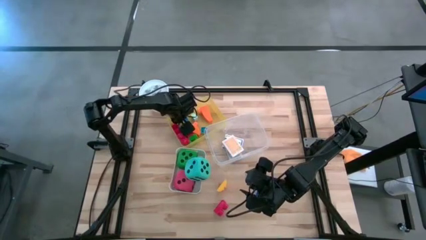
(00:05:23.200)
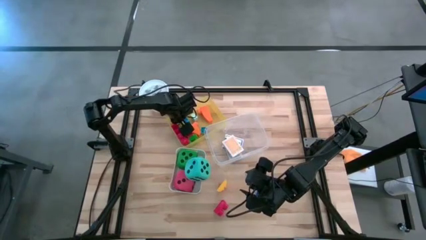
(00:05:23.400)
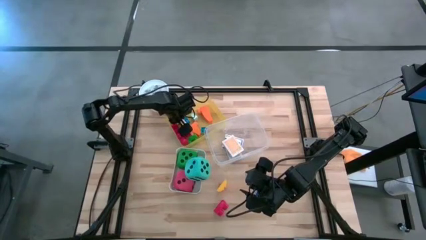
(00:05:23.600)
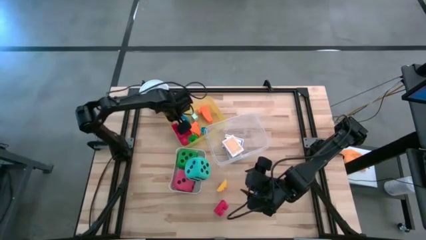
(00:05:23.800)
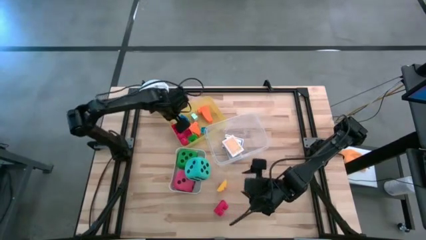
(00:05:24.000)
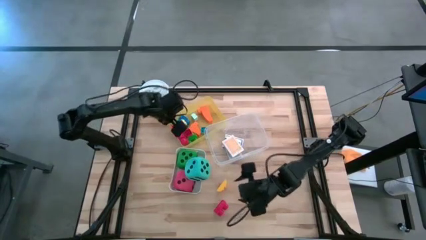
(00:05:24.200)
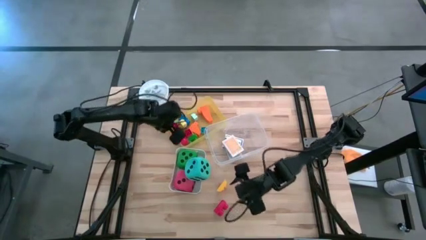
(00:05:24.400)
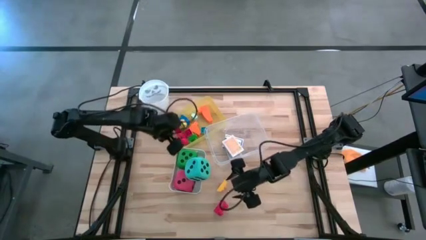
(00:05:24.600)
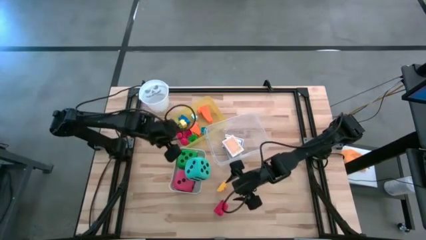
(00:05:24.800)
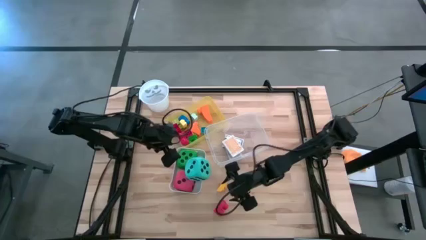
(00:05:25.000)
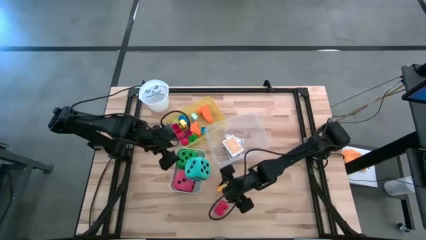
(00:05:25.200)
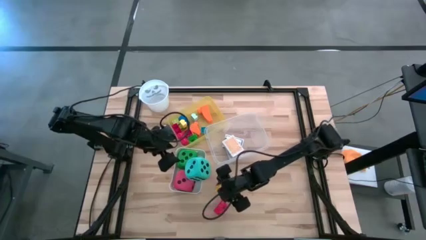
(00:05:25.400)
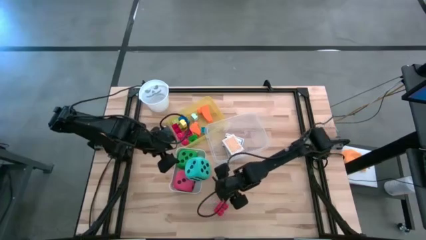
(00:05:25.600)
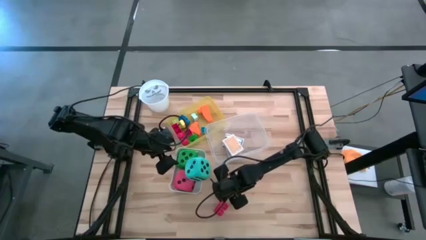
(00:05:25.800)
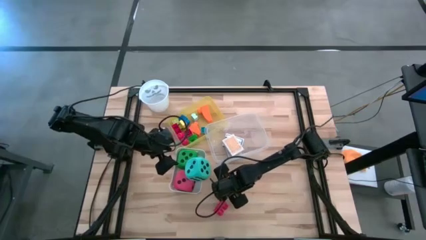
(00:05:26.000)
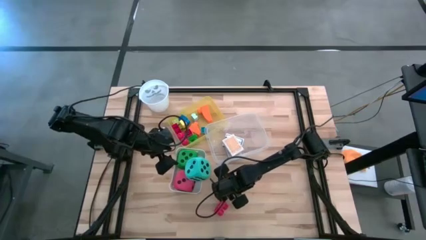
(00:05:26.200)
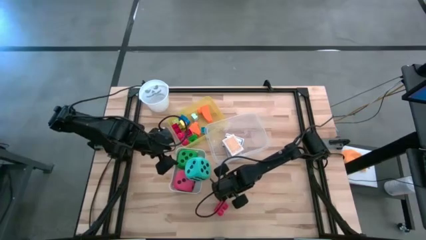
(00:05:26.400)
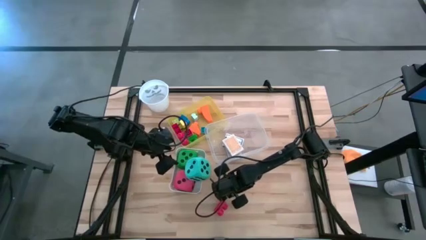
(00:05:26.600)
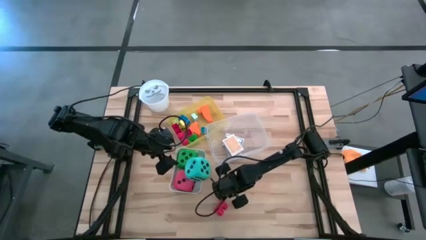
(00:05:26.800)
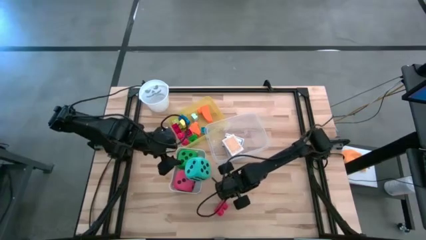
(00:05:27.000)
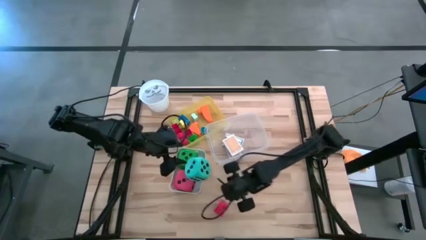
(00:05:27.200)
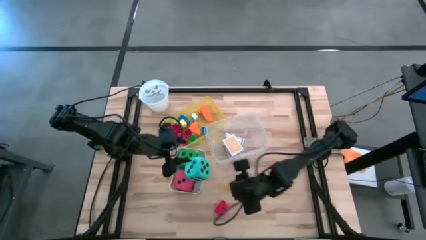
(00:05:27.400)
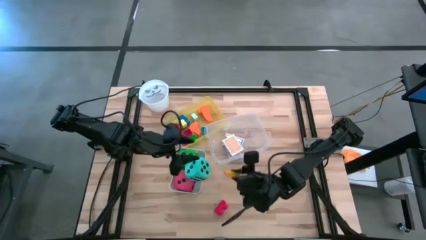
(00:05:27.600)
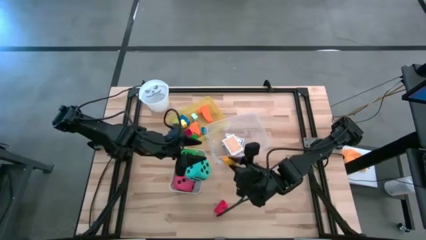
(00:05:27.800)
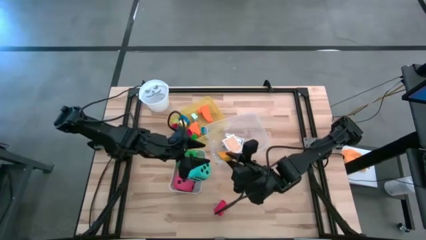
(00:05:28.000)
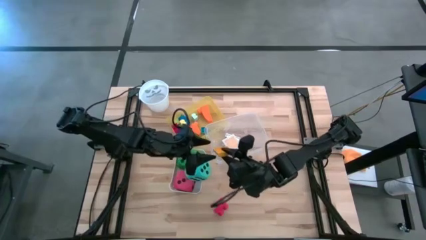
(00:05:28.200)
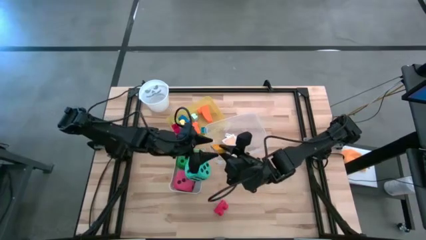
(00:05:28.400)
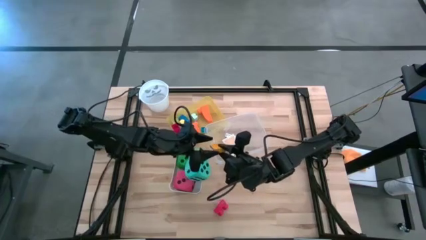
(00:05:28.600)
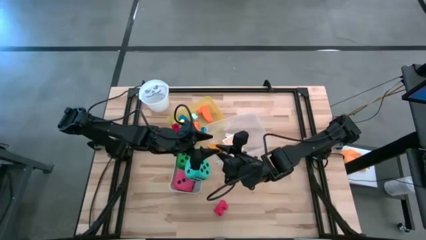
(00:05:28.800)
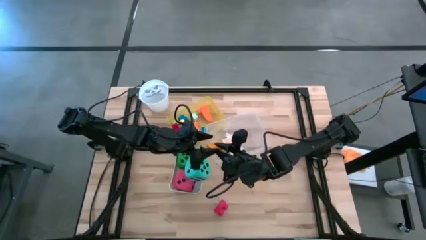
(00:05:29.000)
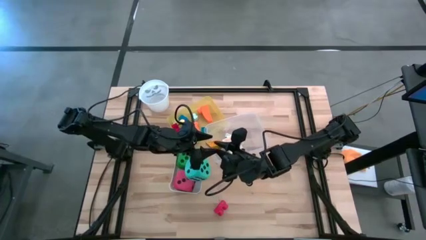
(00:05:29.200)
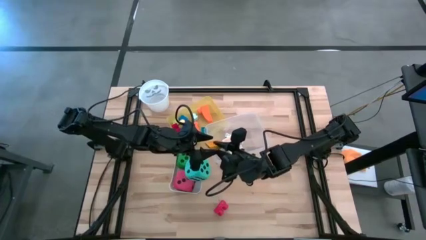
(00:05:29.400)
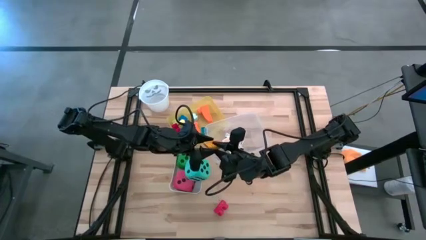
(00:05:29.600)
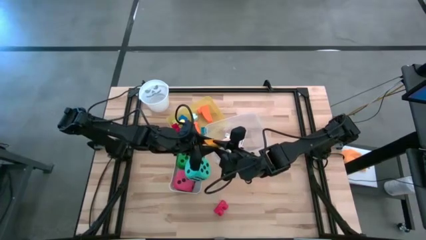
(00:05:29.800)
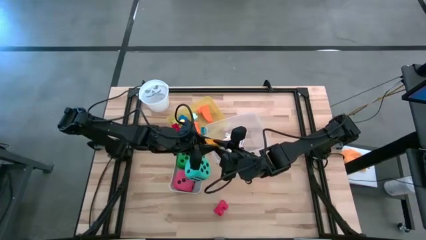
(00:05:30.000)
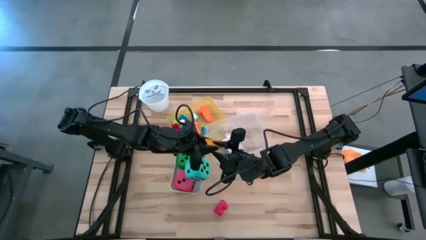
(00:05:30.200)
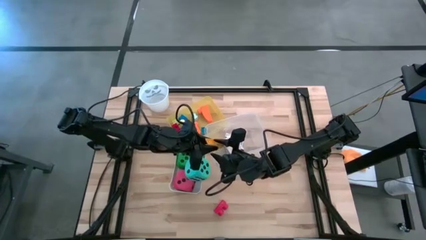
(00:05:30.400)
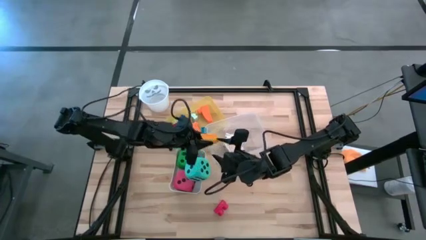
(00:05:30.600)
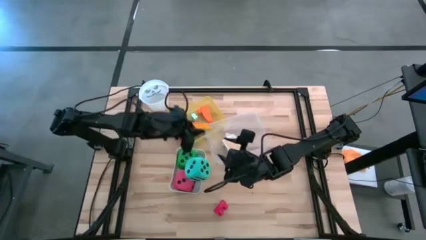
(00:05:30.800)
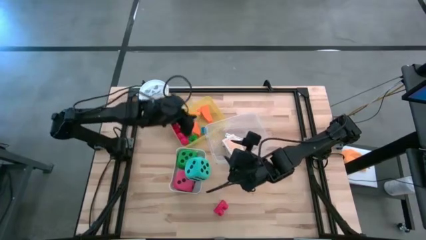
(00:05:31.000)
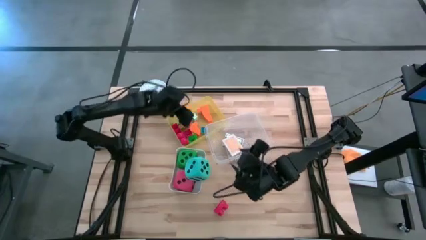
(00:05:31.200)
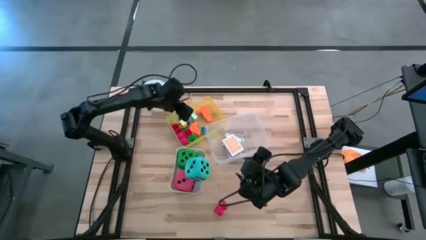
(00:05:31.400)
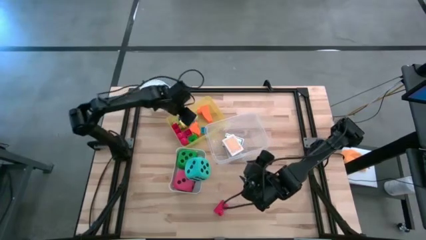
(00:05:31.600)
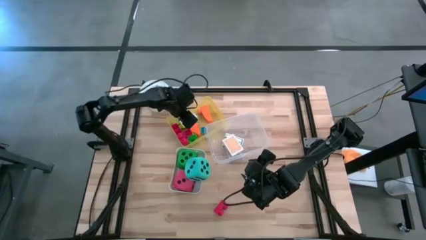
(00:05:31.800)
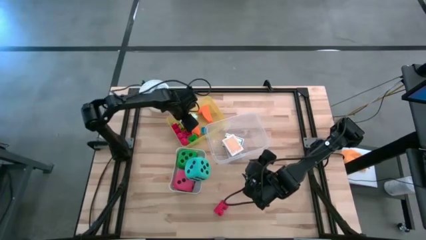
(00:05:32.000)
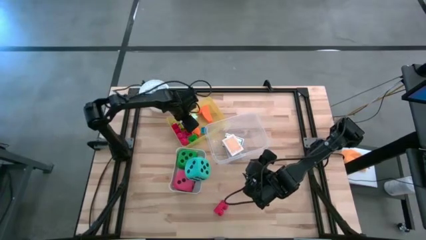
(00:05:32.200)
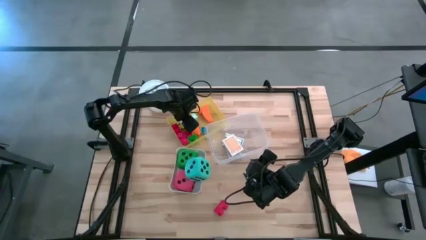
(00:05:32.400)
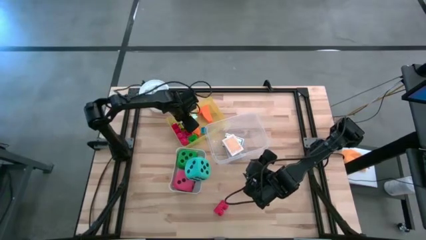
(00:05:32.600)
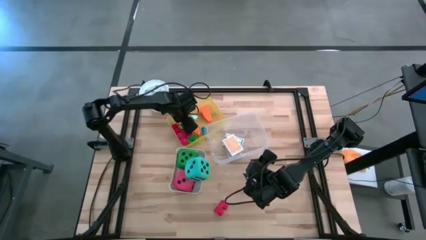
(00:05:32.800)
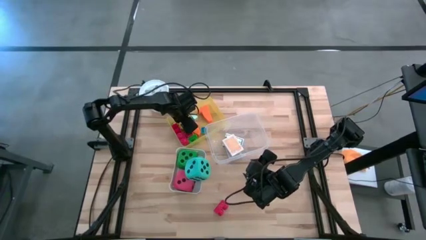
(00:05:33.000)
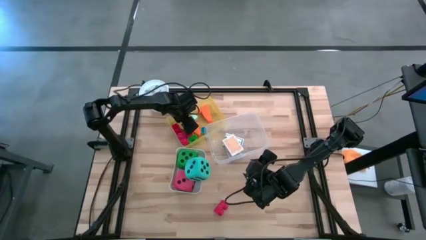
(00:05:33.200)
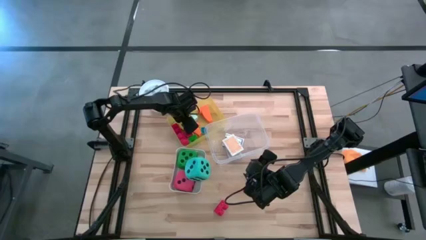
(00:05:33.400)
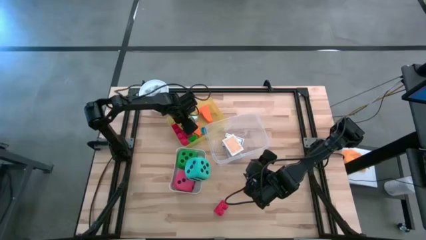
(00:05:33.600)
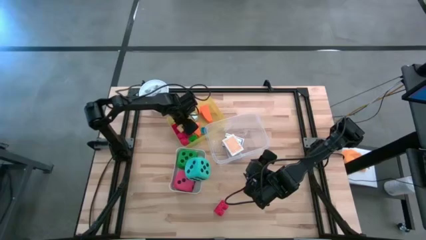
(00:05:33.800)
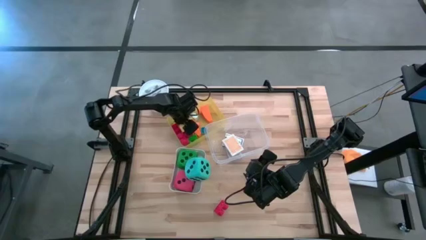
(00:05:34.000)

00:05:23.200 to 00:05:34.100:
Task: Pick & Place Toys
Put the dark yellow game piece into the yellow bin

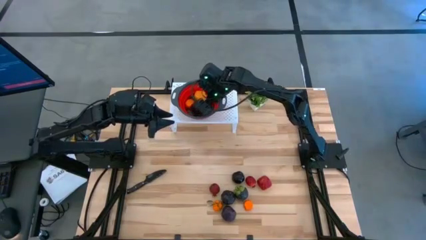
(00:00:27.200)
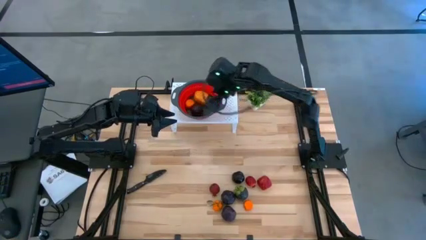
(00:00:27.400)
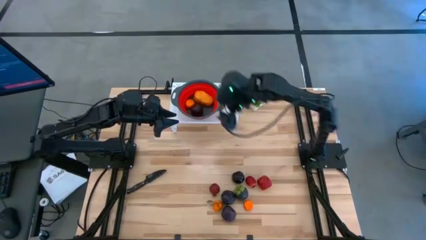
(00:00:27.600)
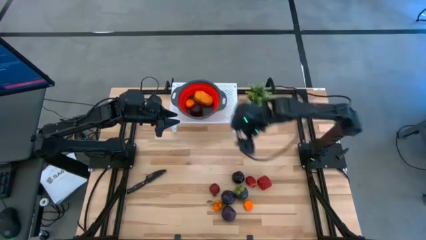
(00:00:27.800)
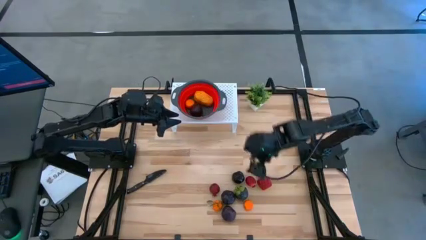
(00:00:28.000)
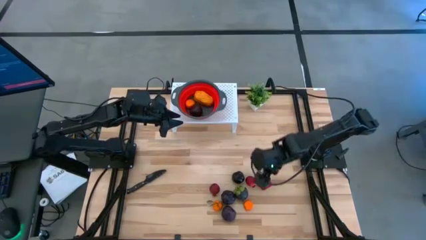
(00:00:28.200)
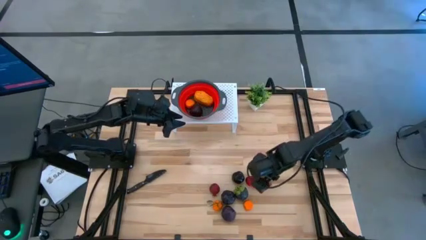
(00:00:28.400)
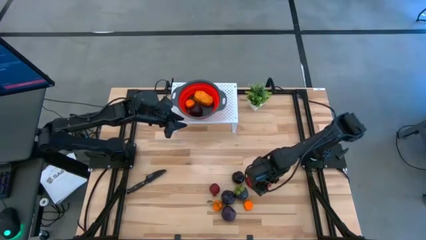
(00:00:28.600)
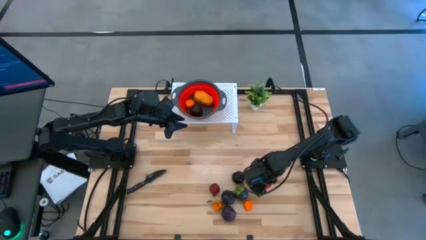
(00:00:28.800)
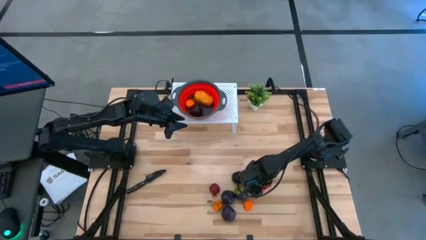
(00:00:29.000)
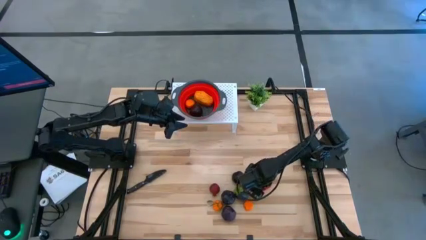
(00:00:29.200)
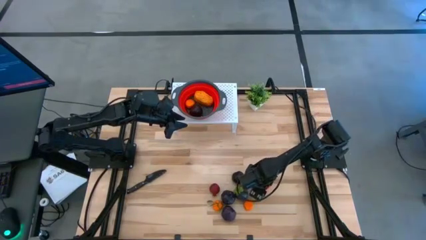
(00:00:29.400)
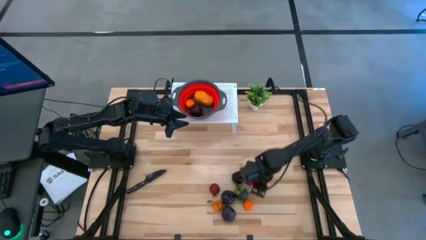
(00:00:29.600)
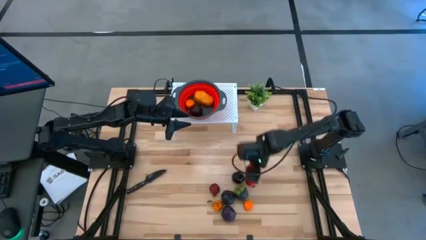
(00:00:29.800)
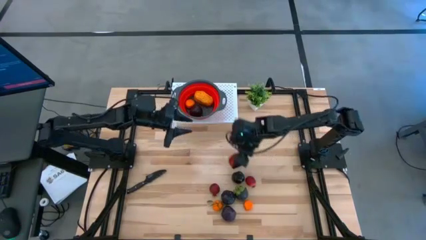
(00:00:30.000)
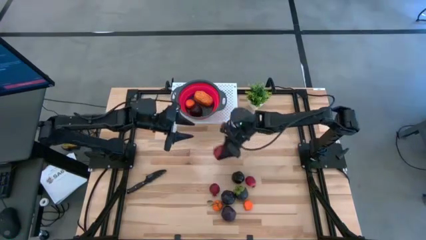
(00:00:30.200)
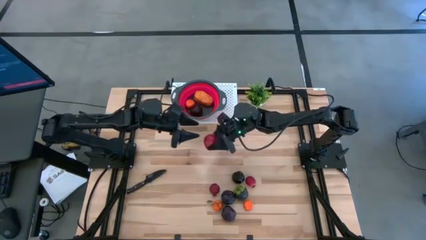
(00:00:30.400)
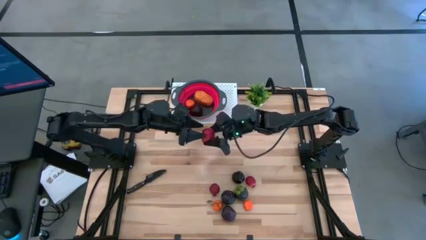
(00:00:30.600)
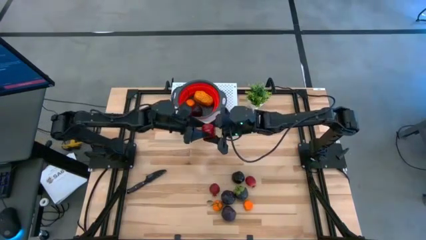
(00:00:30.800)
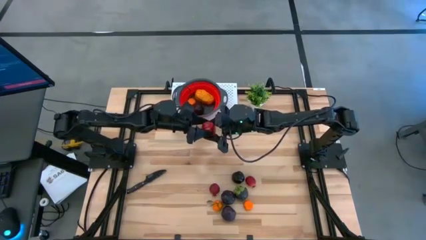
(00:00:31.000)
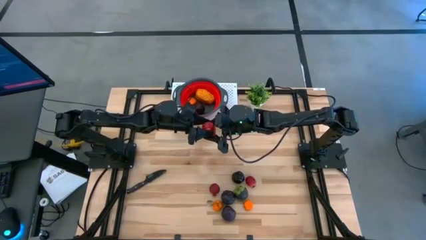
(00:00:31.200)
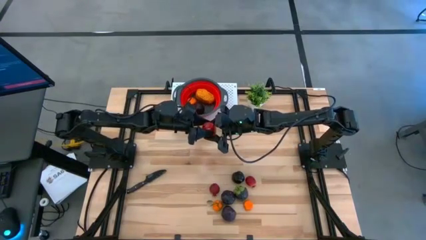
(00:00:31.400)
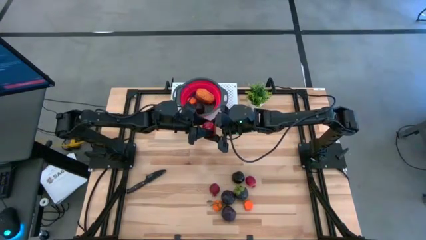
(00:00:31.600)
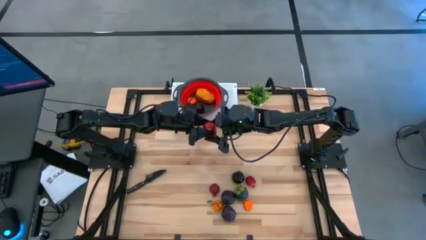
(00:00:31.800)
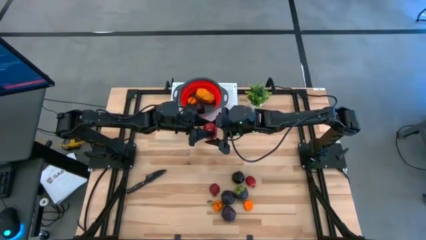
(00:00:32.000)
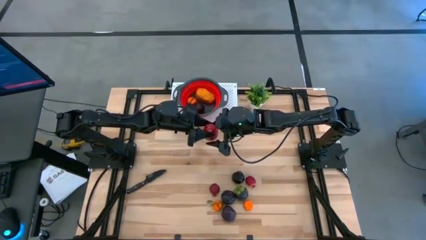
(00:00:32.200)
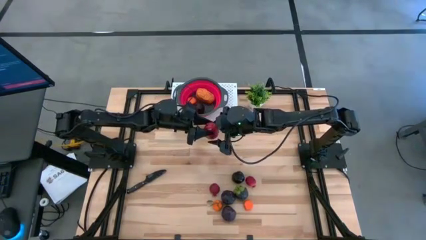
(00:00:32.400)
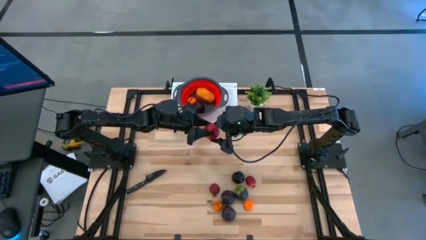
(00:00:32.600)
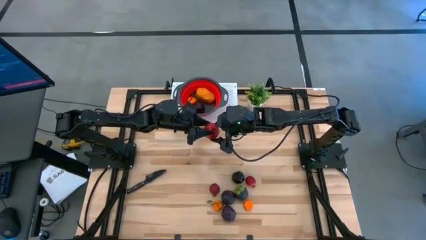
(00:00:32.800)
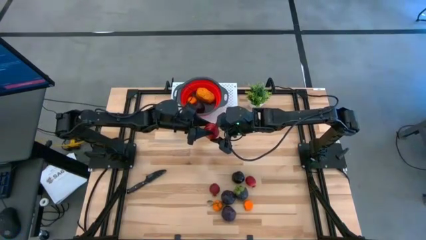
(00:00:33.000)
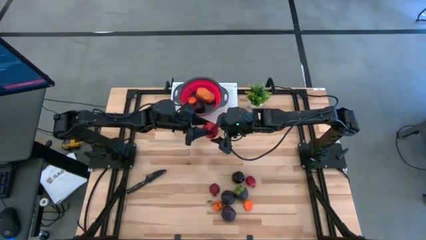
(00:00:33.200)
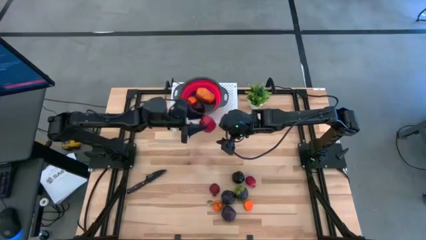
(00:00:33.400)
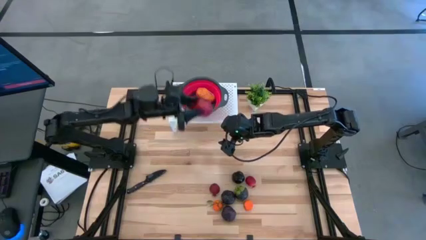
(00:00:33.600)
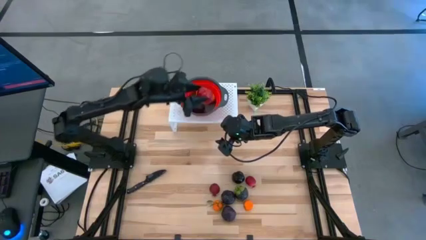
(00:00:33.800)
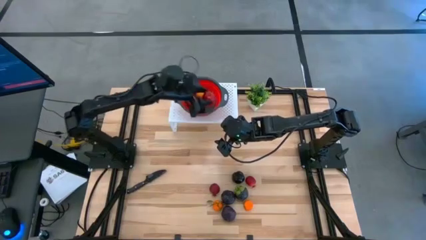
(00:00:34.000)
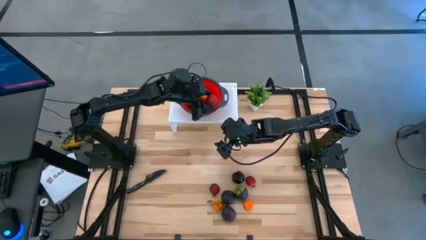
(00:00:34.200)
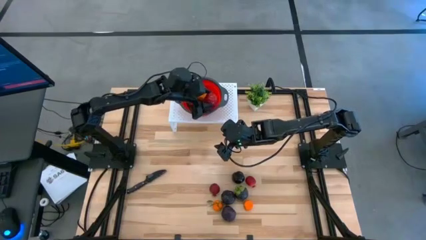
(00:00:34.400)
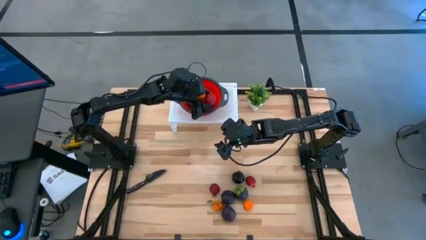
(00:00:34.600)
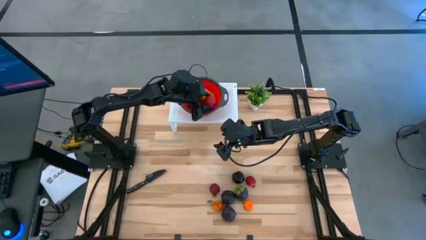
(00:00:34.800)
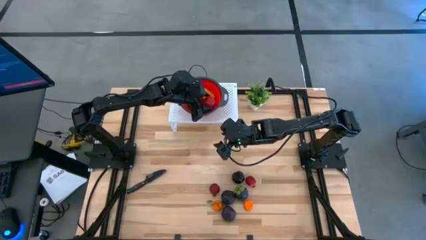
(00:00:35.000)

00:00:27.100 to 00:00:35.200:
Task: Pick & Place Fruit
Put the red apple into the red strainer bowl on the shelf
